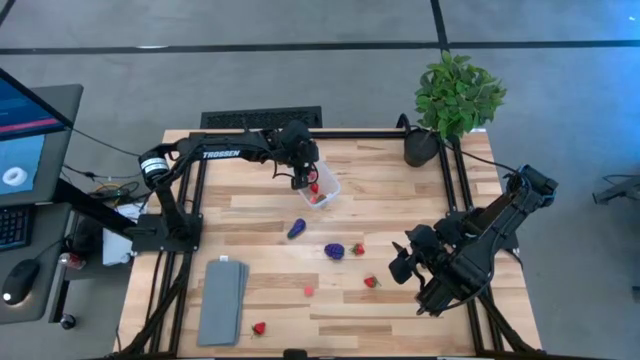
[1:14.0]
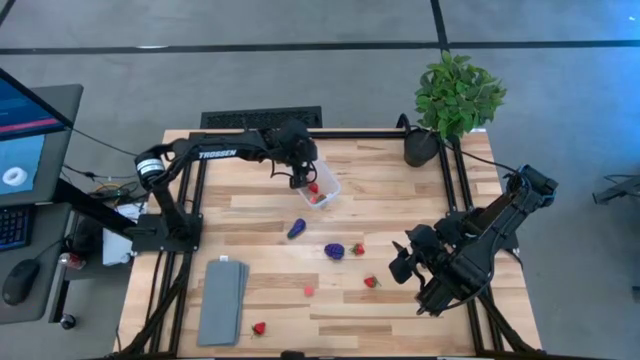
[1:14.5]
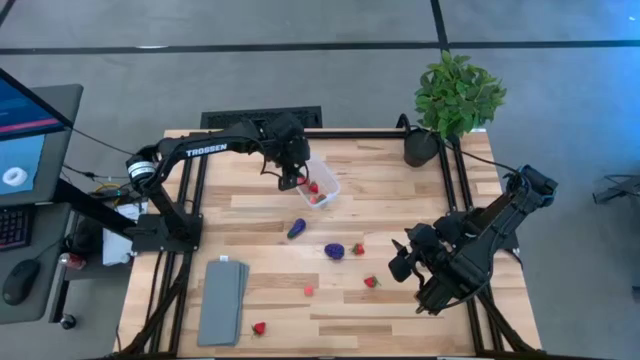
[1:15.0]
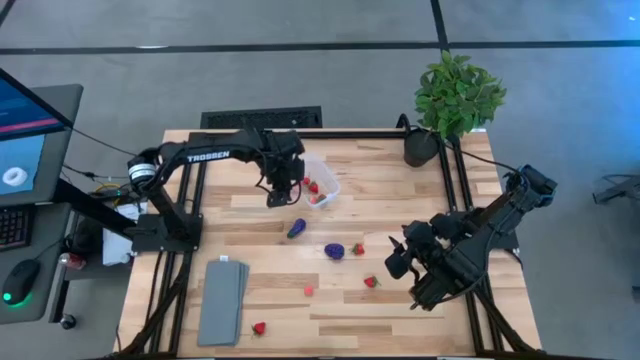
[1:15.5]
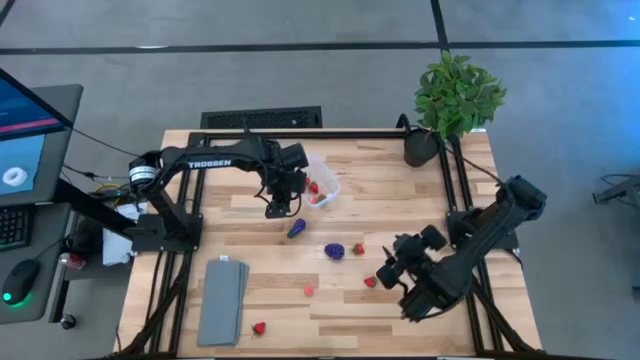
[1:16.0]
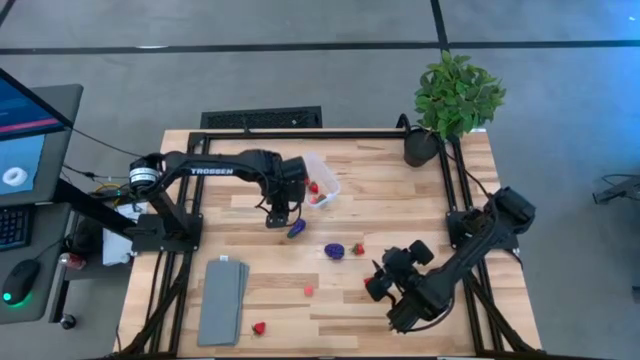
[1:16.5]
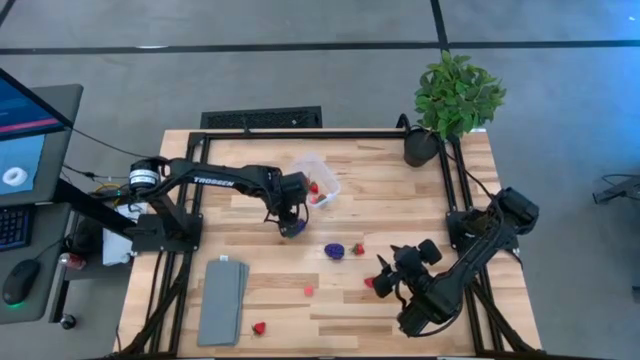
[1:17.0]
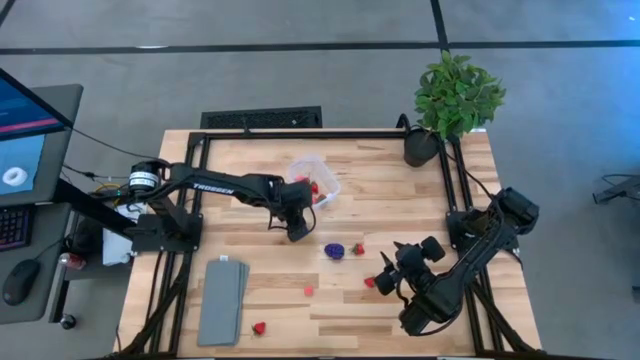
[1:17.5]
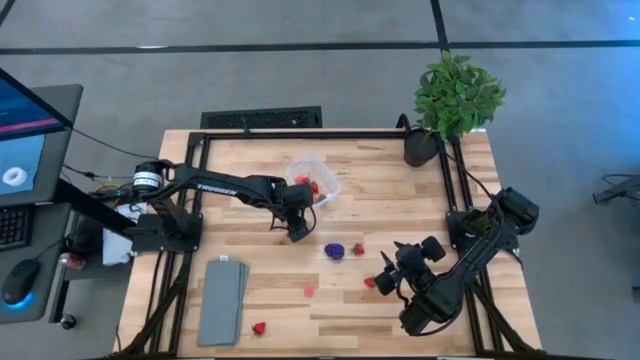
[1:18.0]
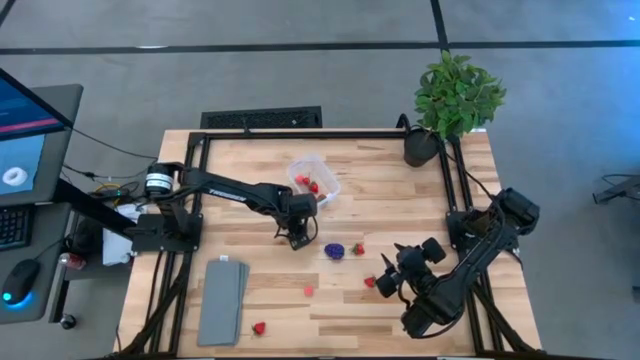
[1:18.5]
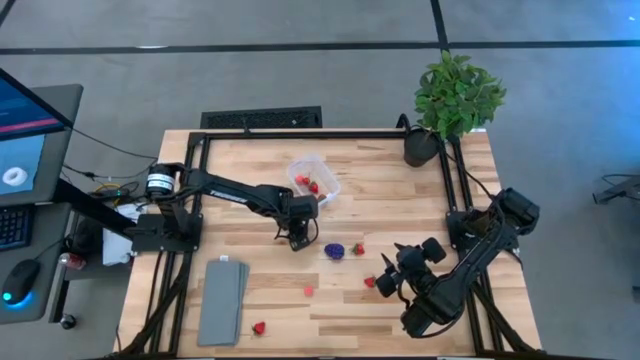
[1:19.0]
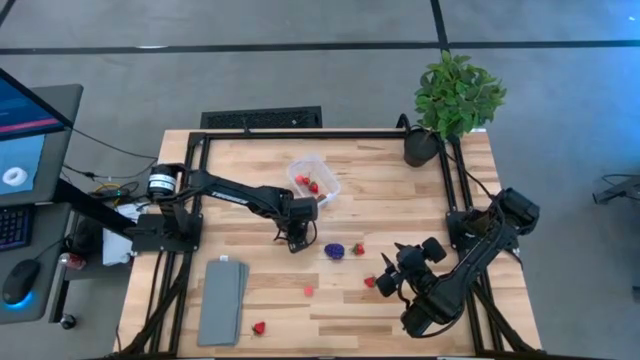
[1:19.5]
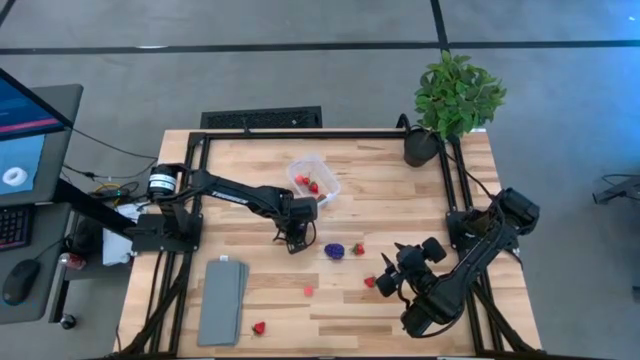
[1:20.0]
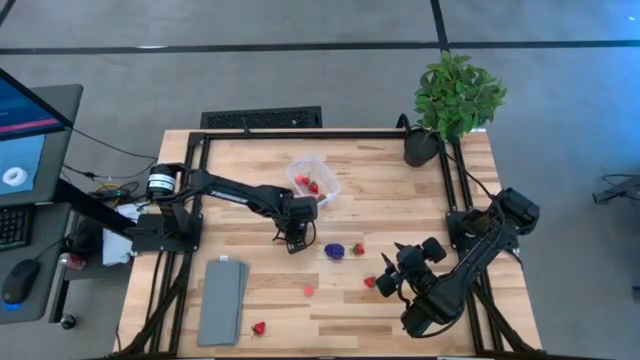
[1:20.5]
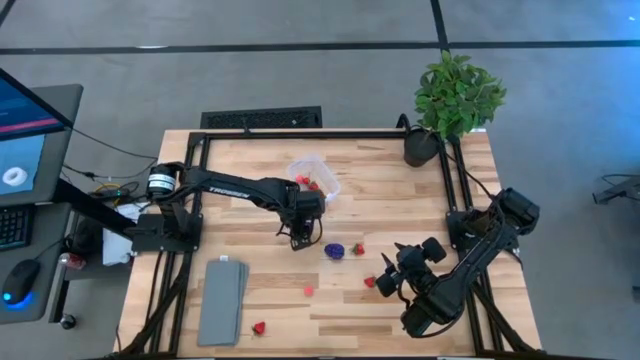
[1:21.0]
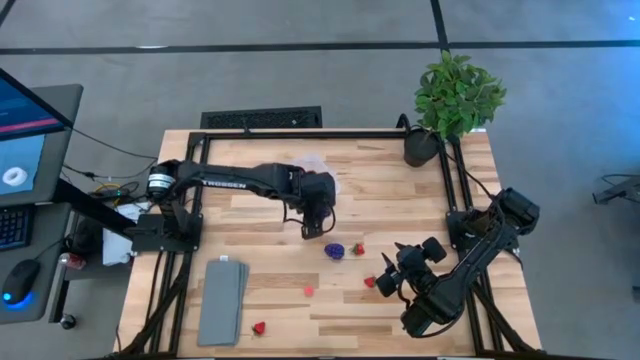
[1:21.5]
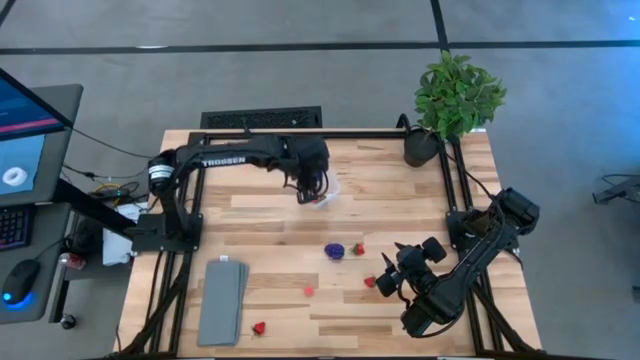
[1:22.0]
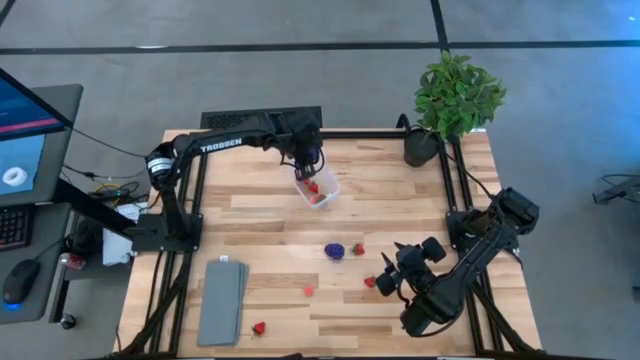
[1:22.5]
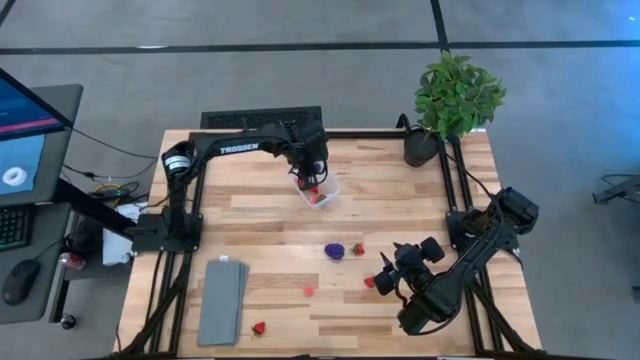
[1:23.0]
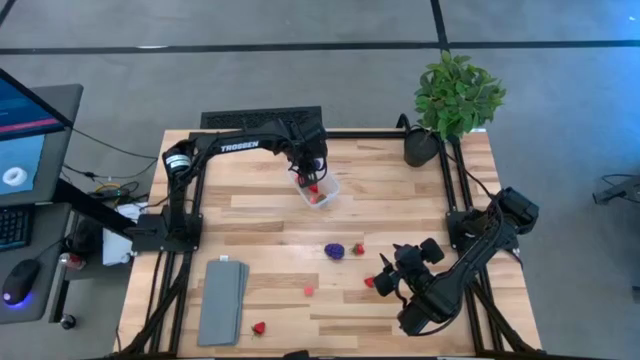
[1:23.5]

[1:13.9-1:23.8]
Task: Pick and placing Produce into tupperware
Put the eggplant into the transparent container

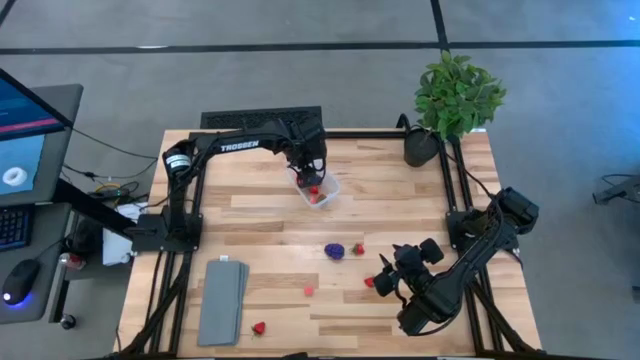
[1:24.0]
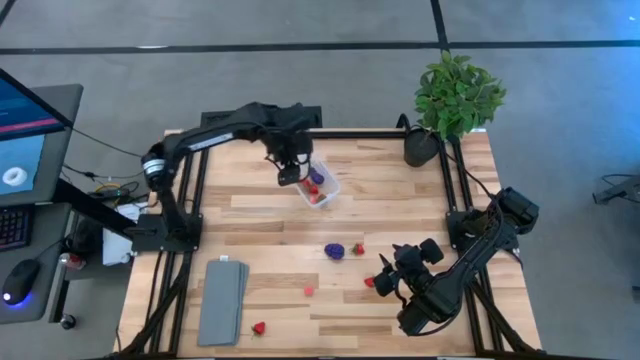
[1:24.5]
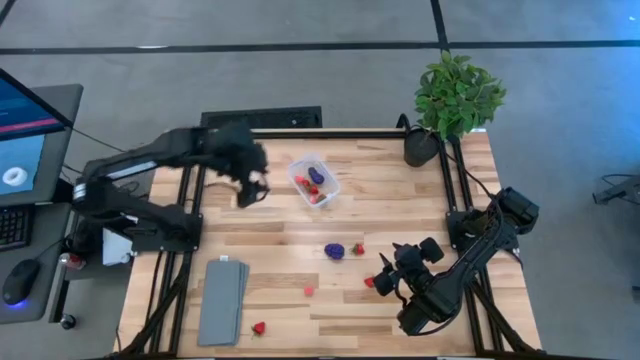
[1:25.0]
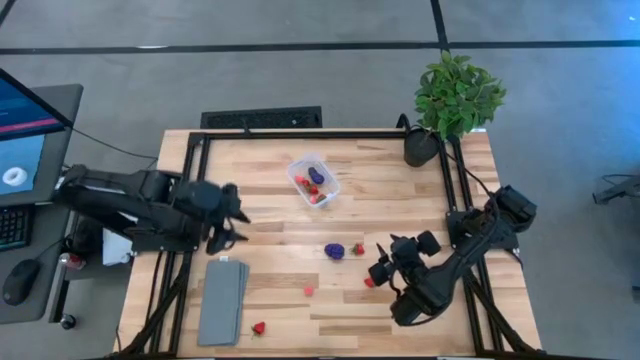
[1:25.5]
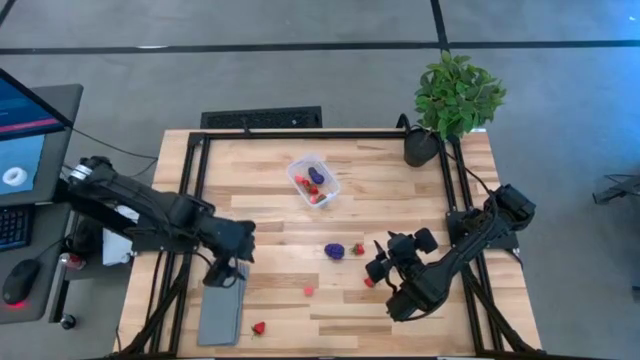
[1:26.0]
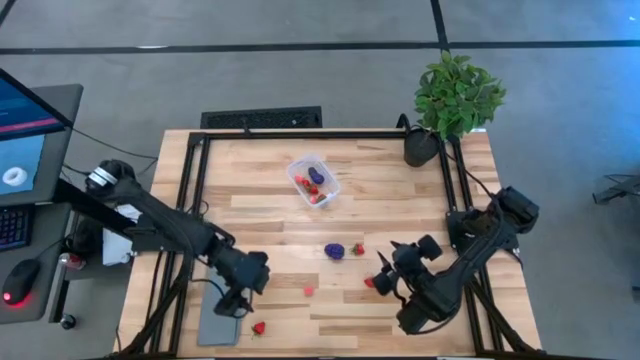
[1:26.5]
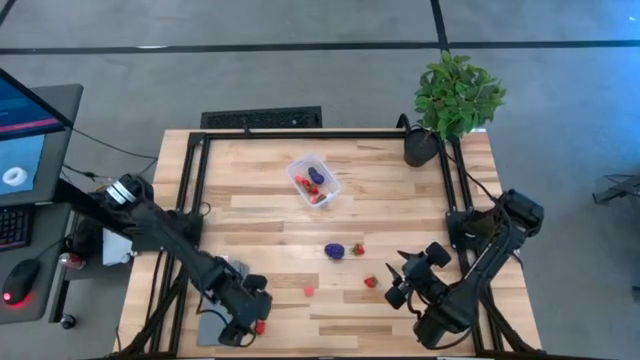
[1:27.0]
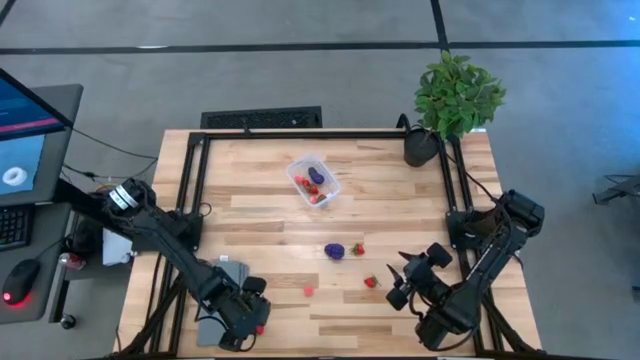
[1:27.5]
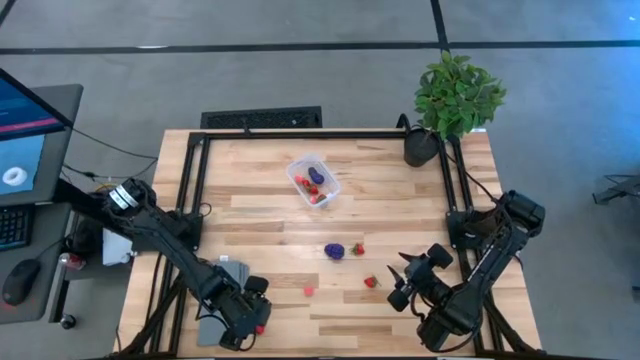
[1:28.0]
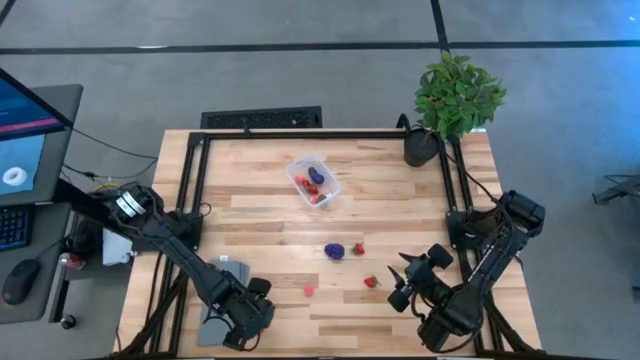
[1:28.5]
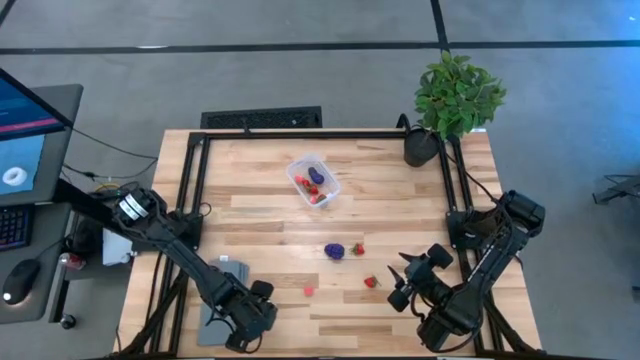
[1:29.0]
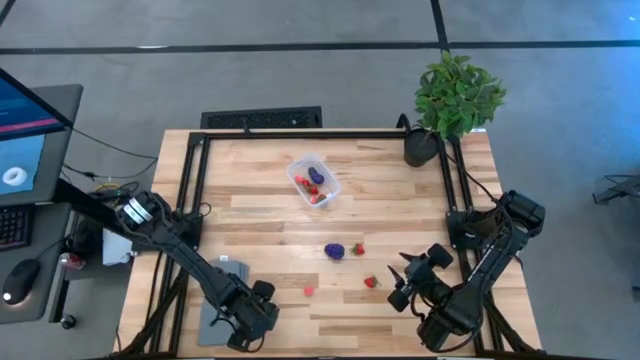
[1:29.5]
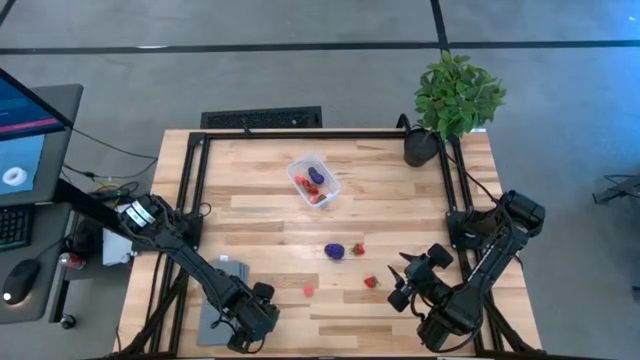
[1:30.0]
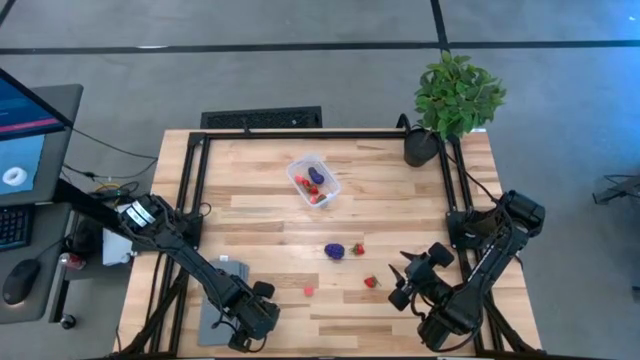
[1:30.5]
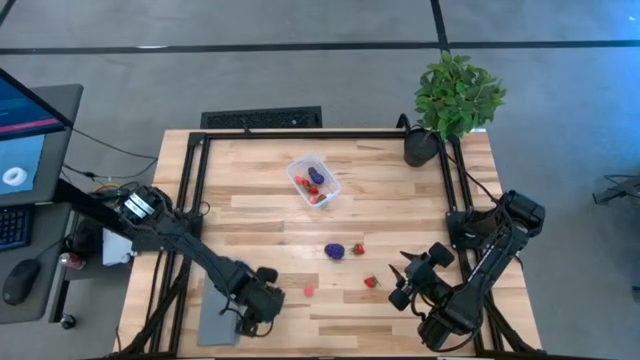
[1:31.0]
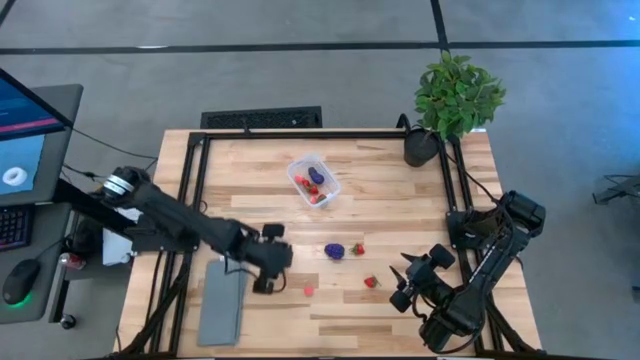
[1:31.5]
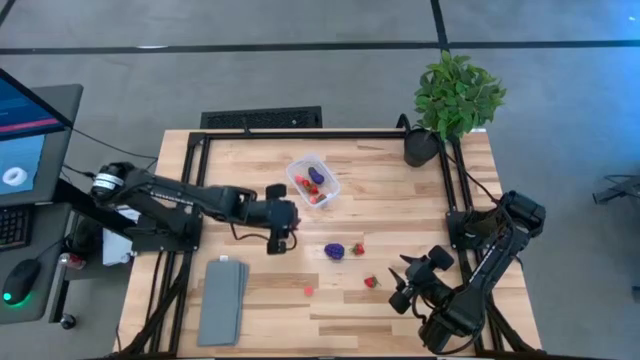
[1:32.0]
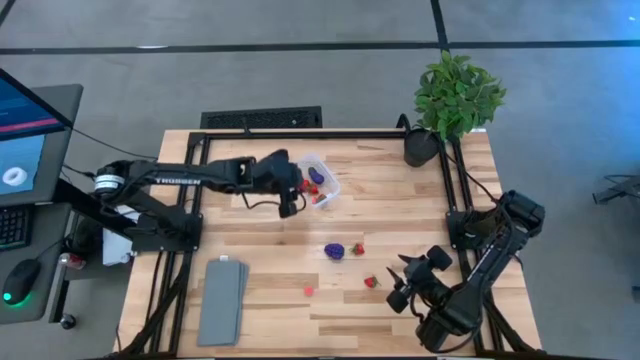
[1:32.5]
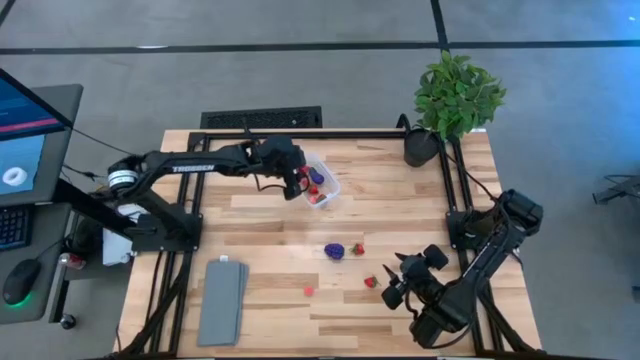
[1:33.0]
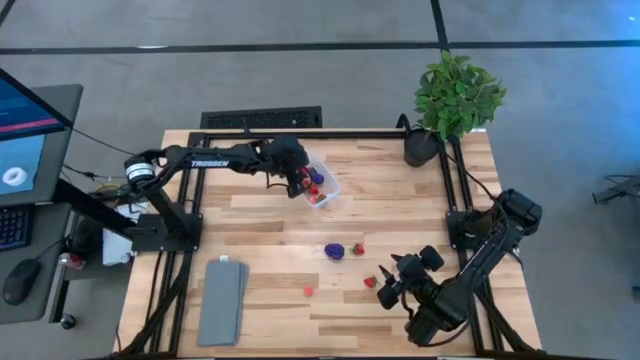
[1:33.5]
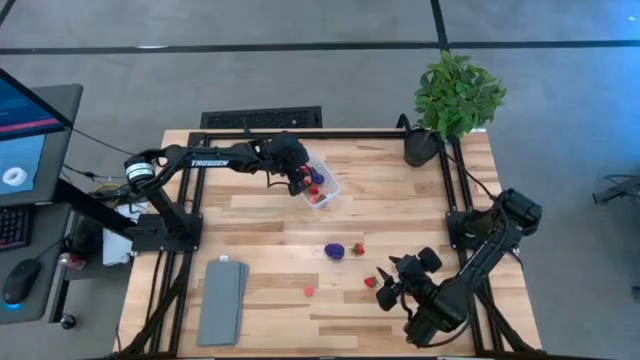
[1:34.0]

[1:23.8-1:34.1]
Put the strawberry into the transparent container
